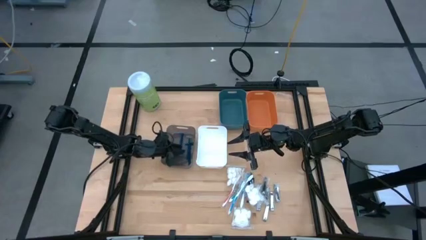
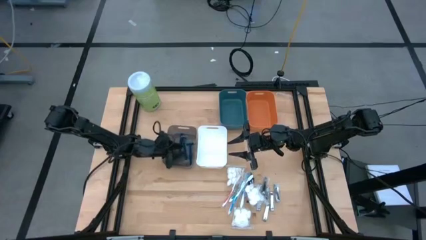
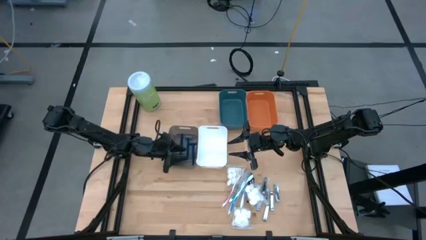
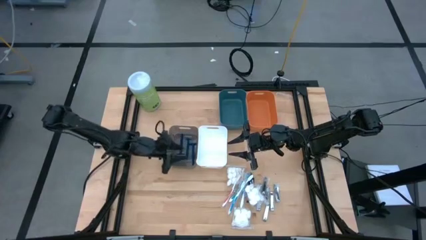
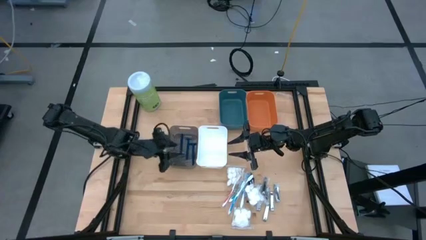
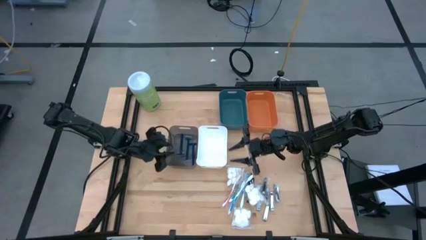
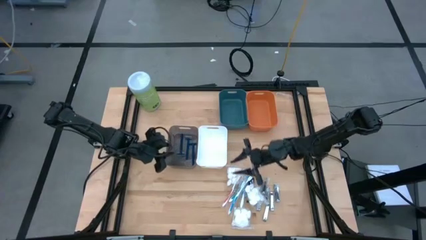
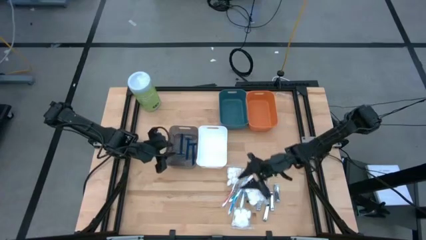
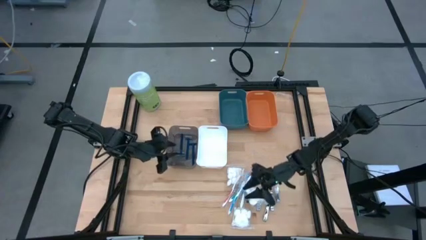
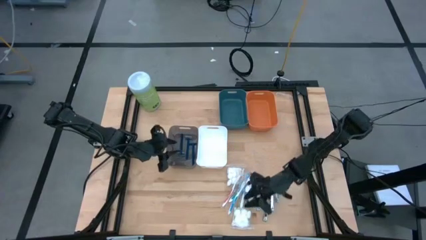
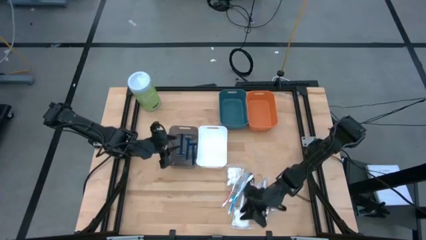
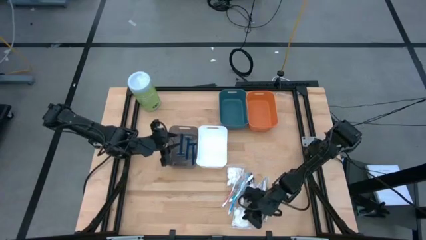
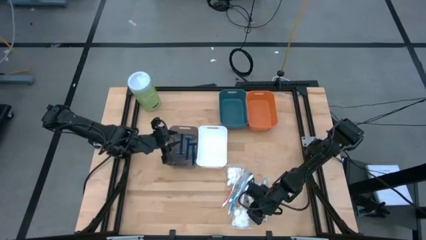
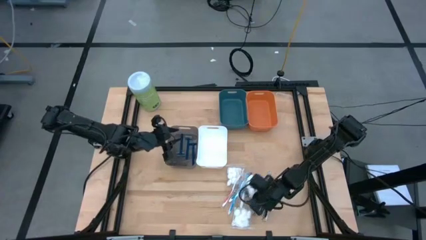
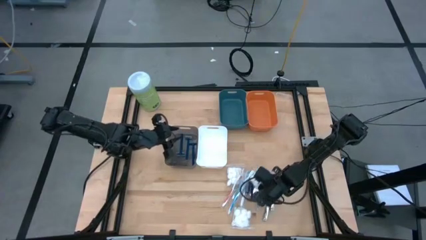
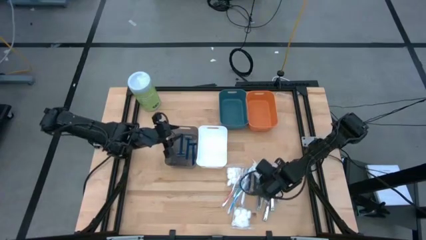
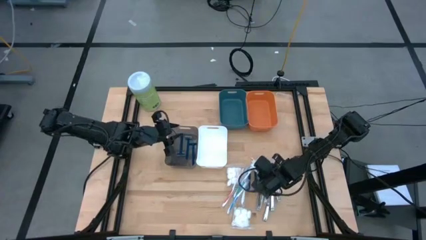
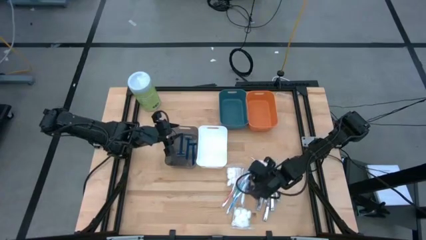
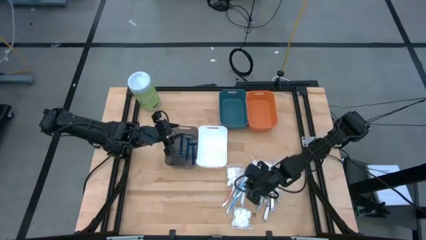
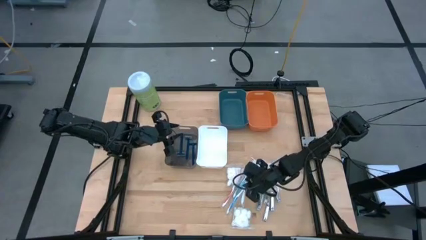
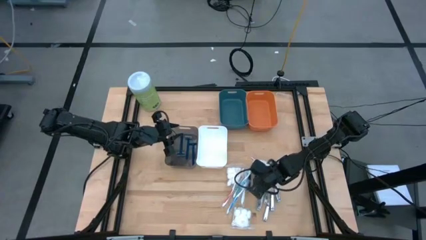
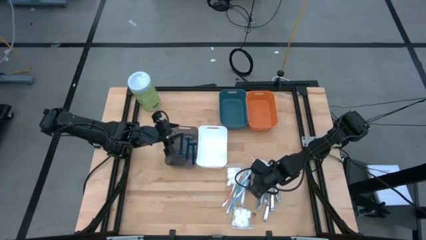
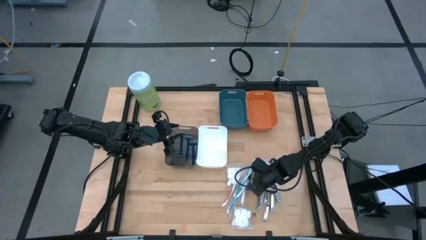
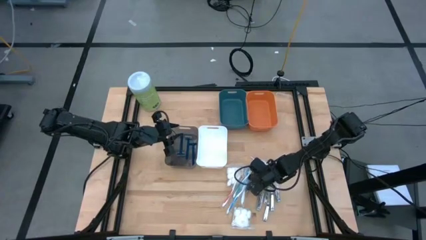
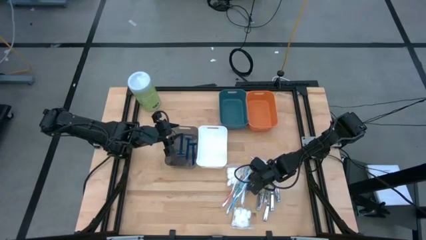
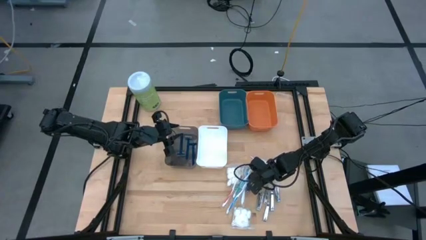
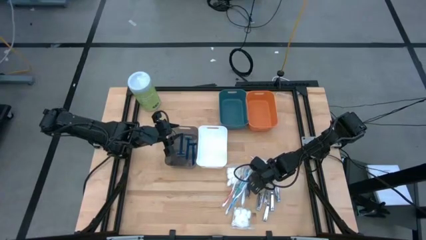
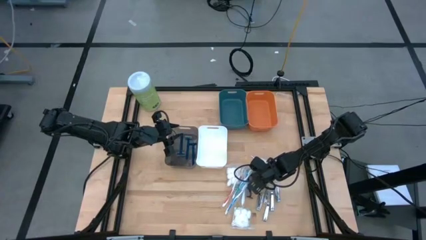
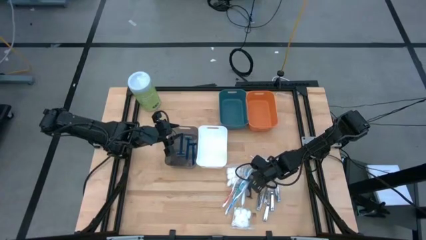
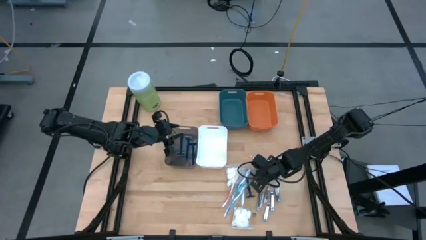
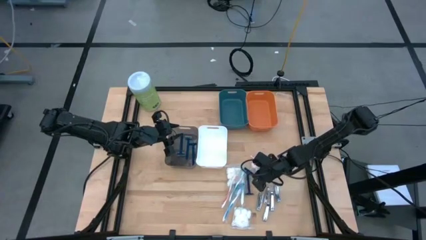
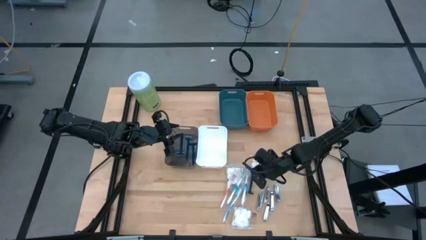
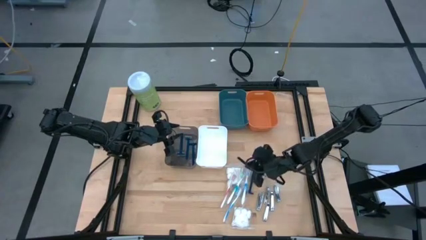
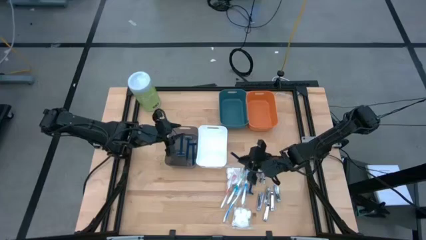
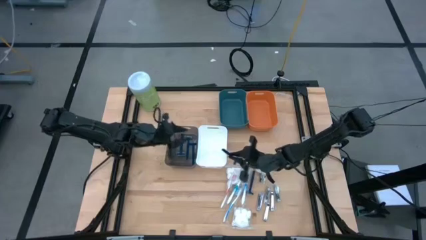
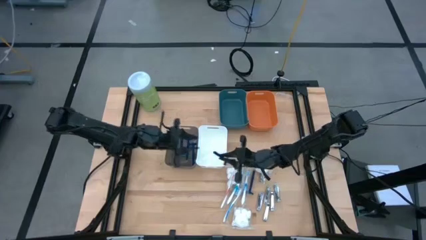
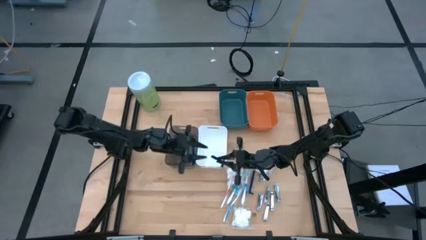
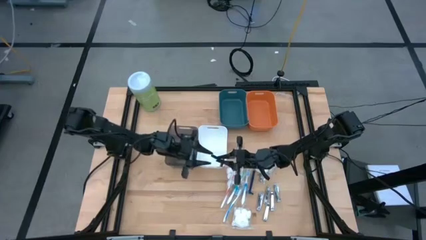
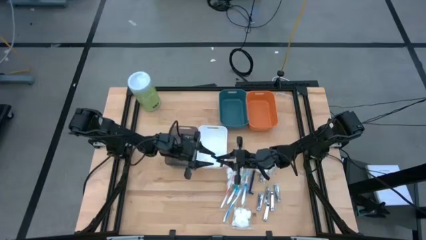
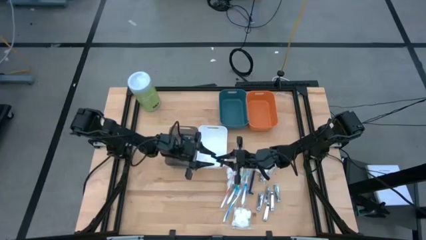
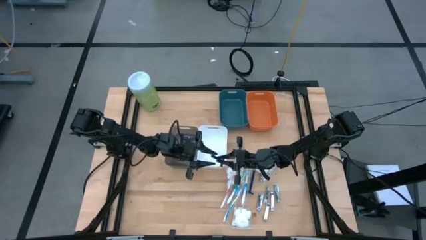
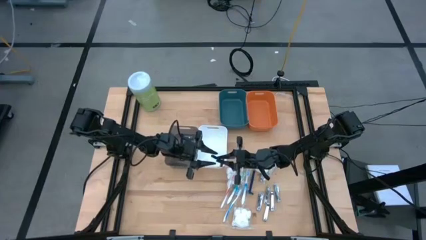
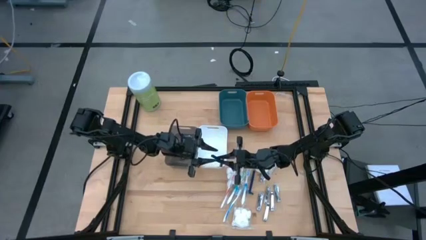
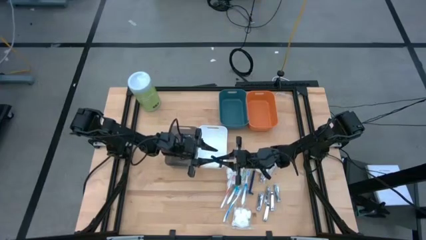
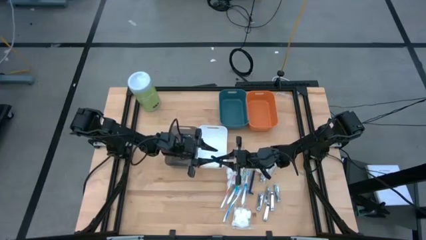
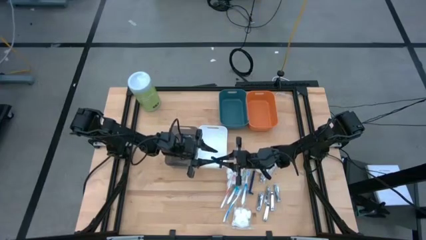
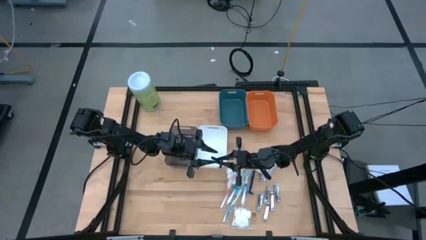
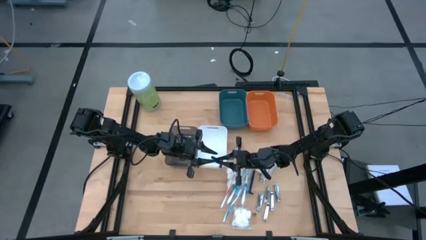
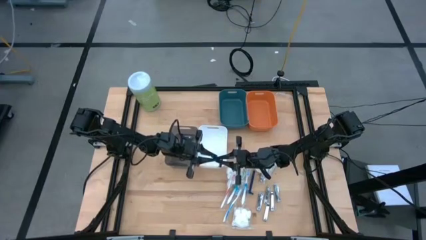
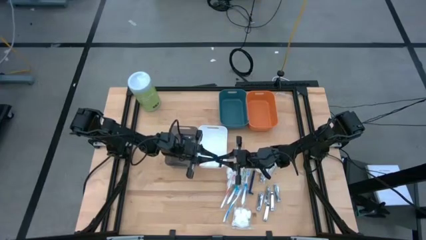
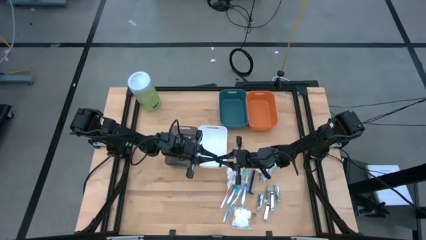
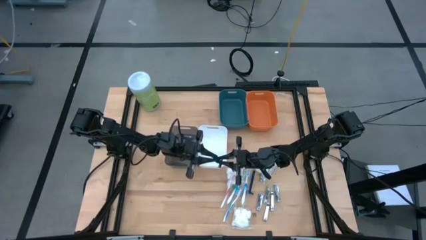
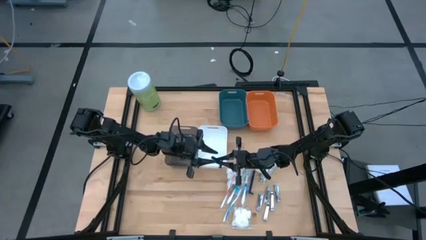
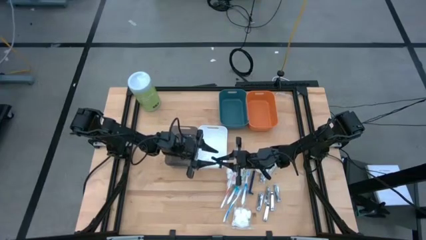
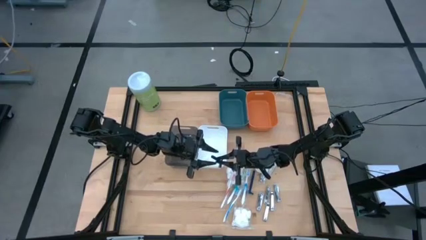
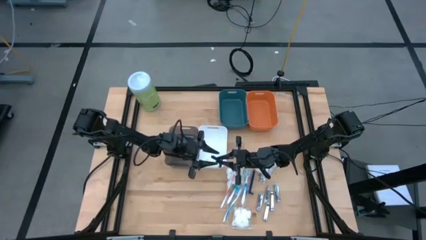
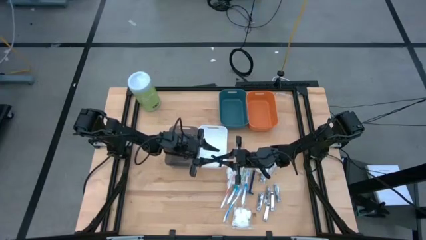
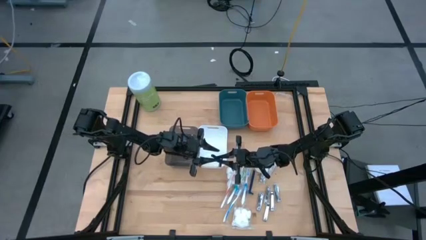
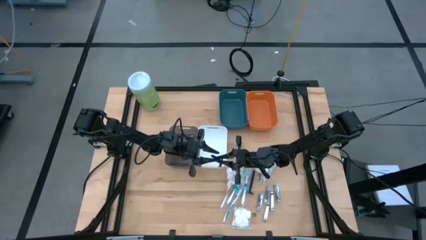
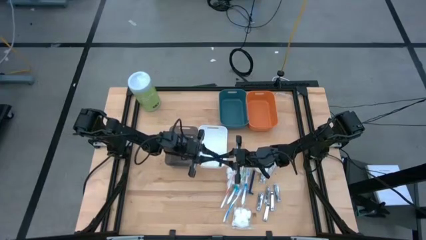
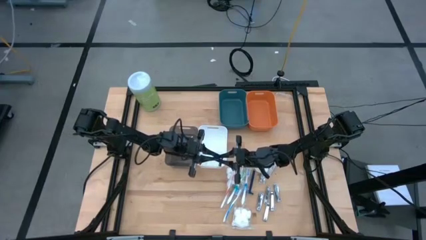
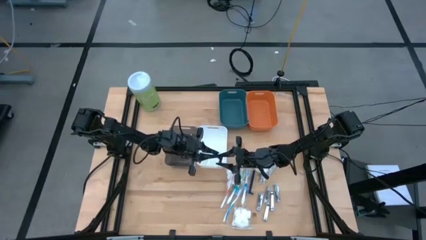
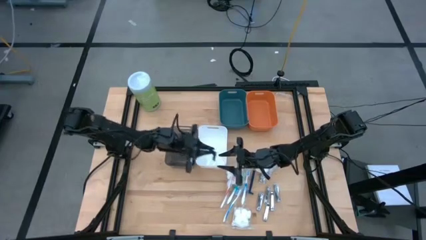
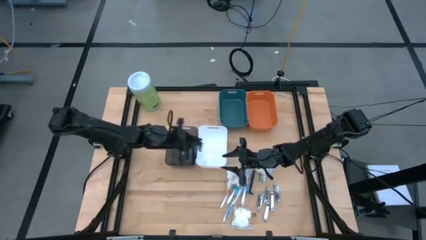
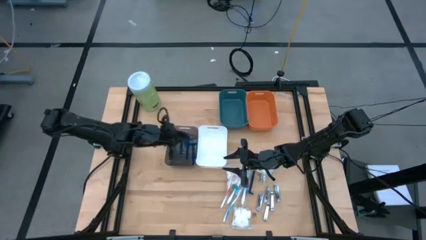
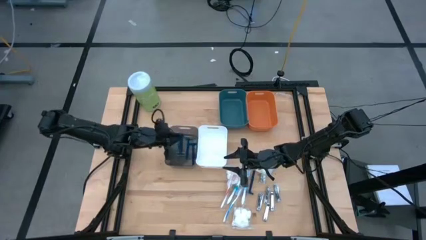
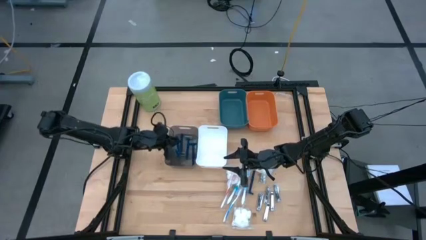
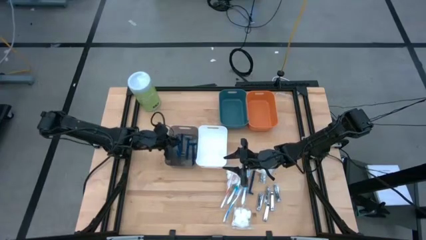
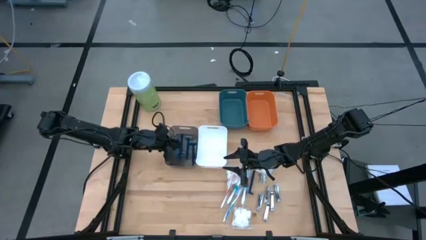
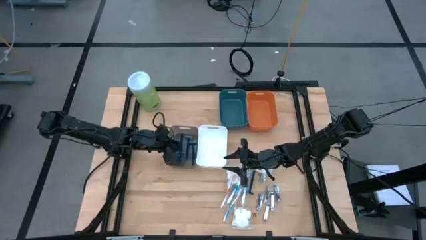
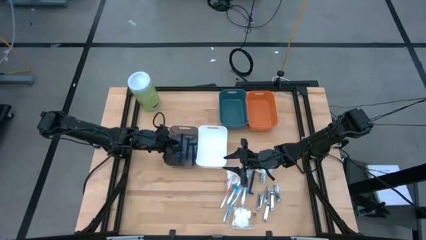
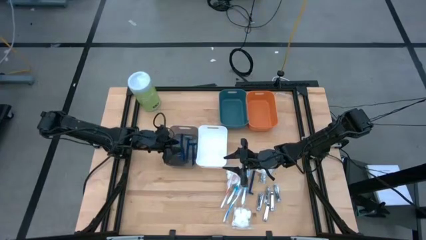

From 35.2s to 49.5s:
Task: Pick & Place Travel size toiletries
Put the blue razor into the black bin
